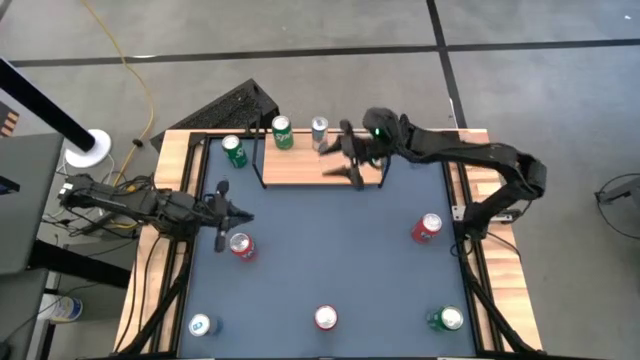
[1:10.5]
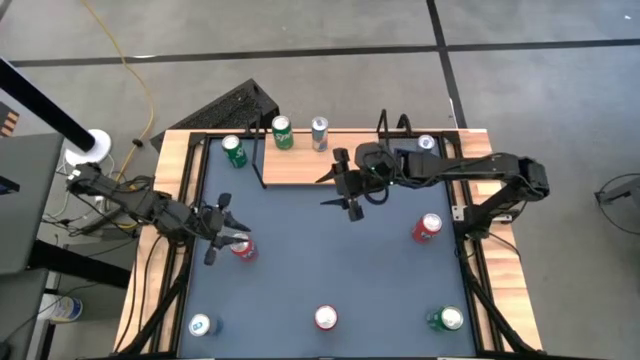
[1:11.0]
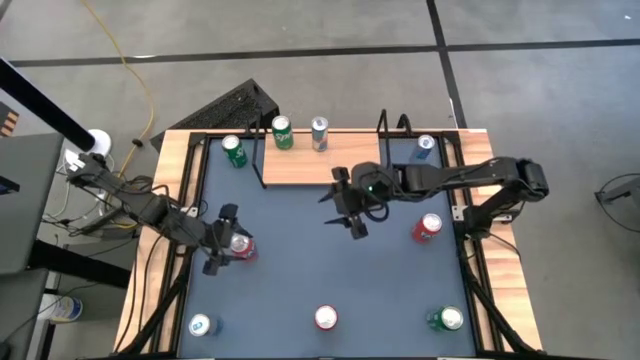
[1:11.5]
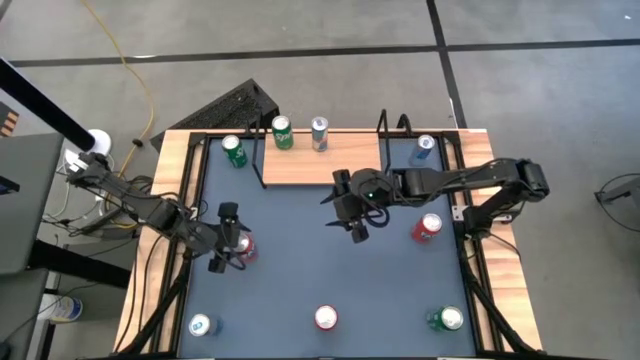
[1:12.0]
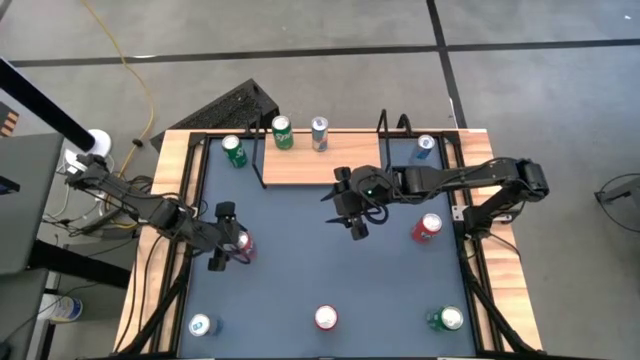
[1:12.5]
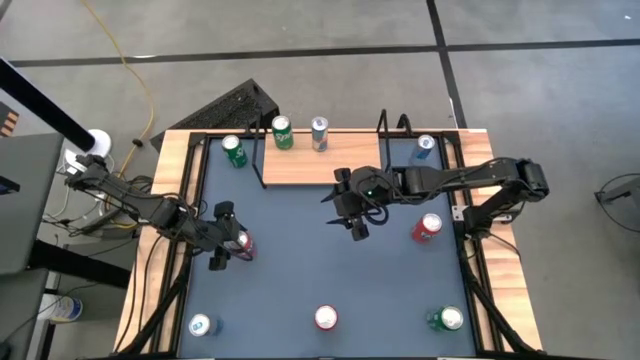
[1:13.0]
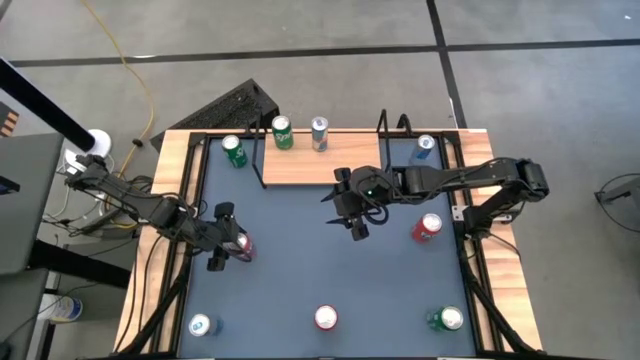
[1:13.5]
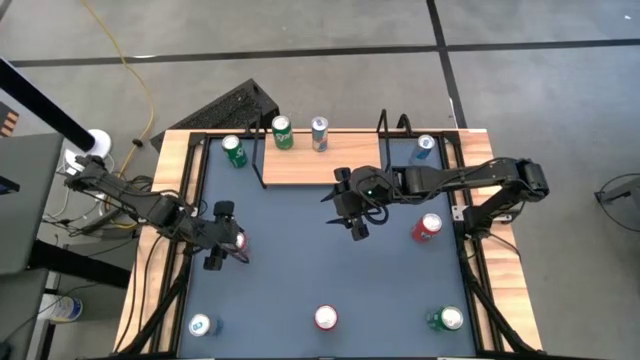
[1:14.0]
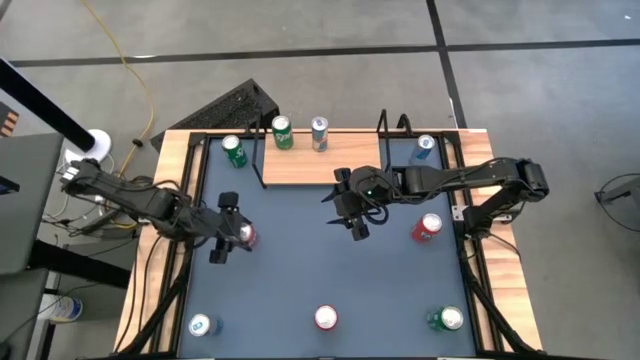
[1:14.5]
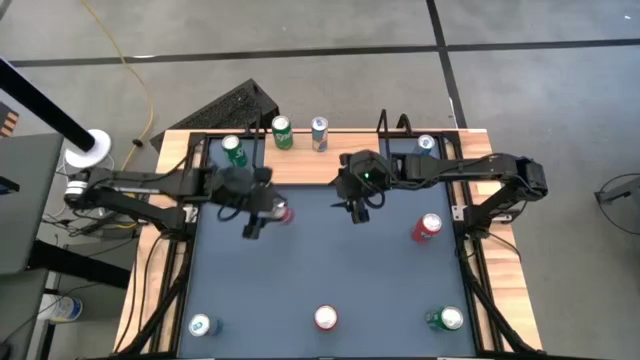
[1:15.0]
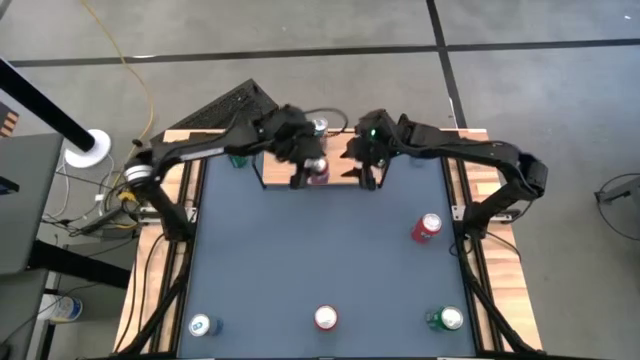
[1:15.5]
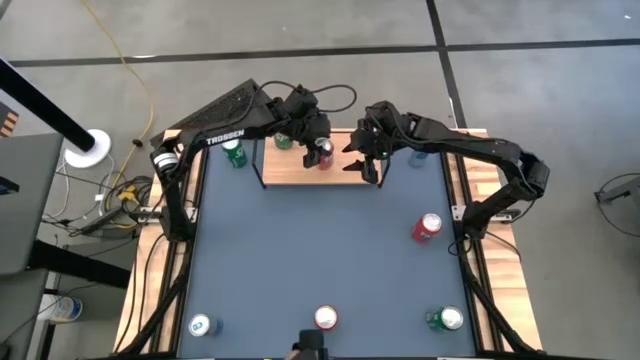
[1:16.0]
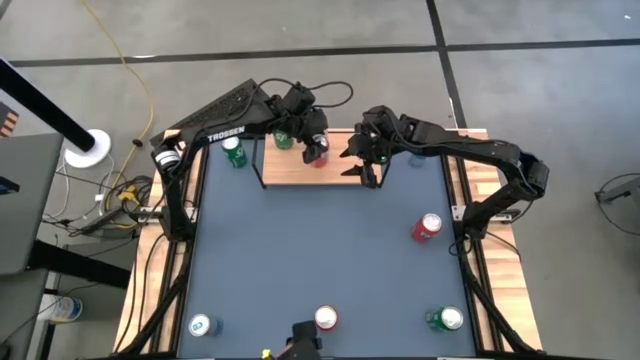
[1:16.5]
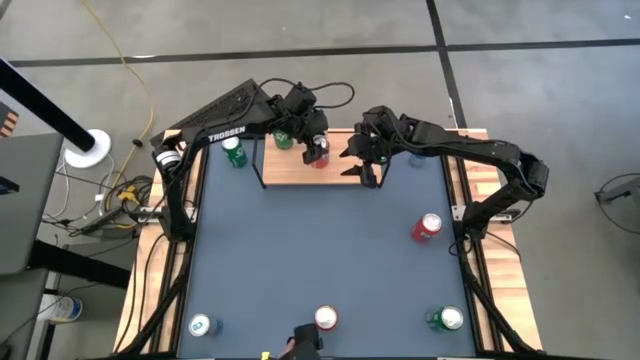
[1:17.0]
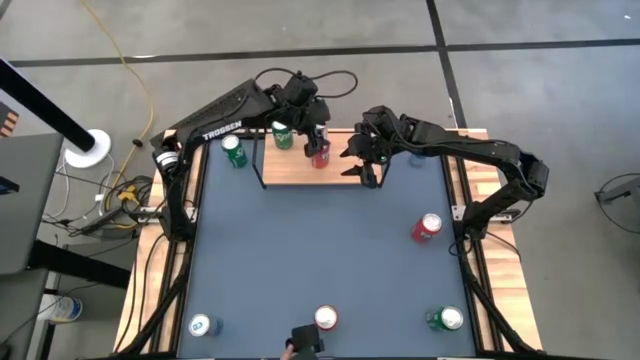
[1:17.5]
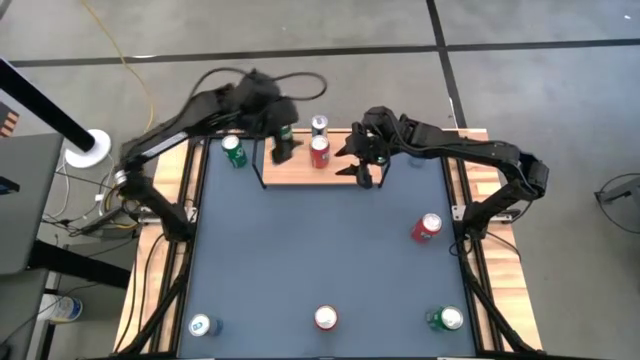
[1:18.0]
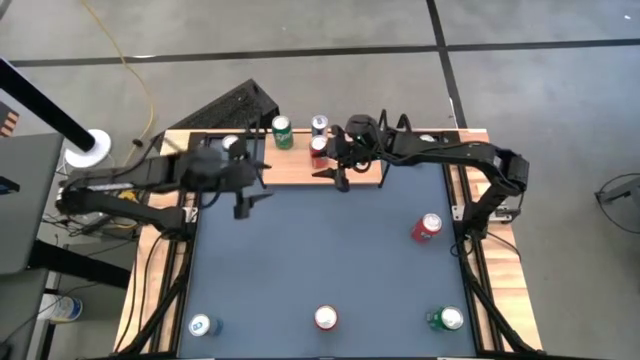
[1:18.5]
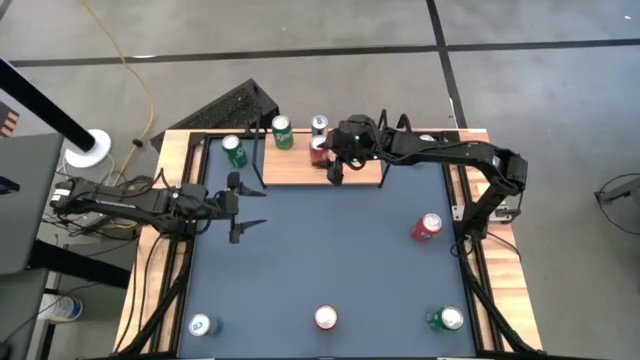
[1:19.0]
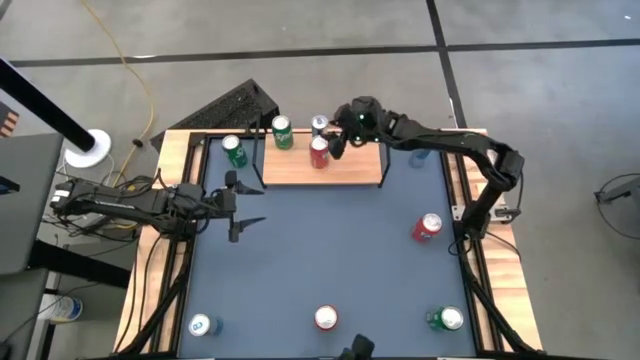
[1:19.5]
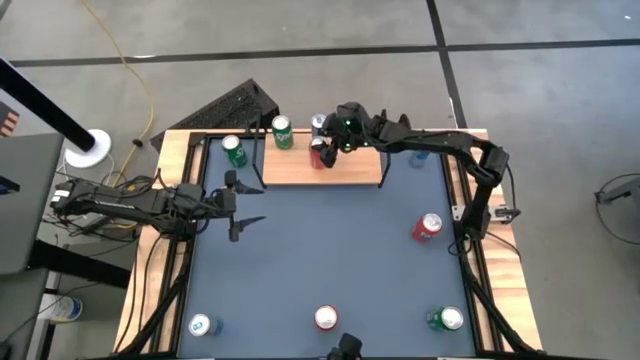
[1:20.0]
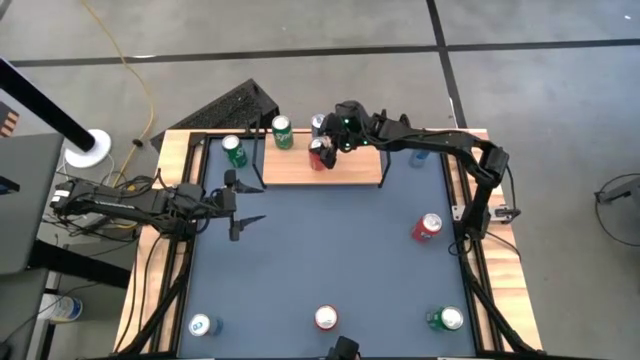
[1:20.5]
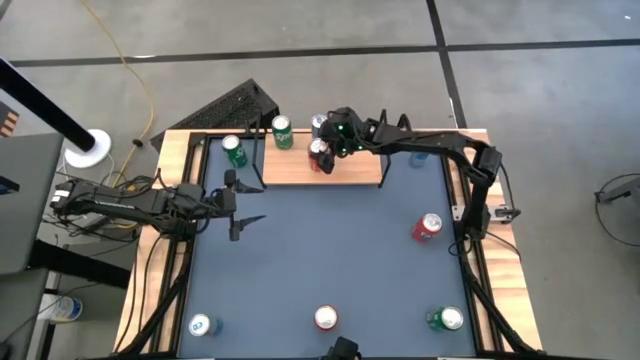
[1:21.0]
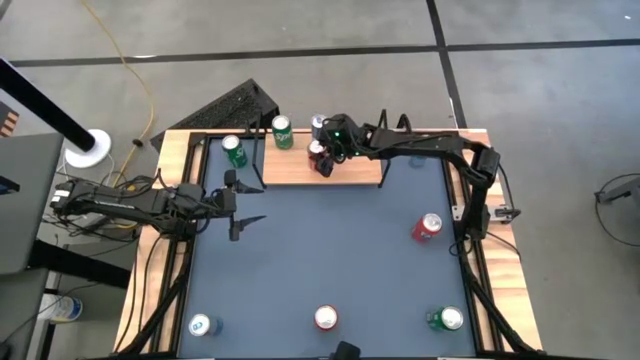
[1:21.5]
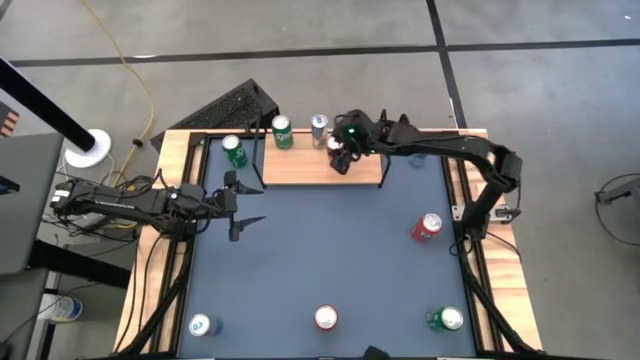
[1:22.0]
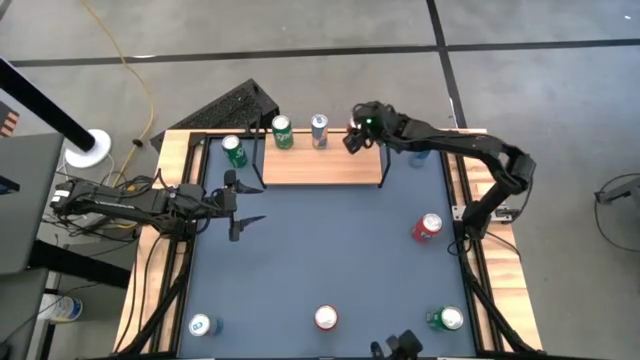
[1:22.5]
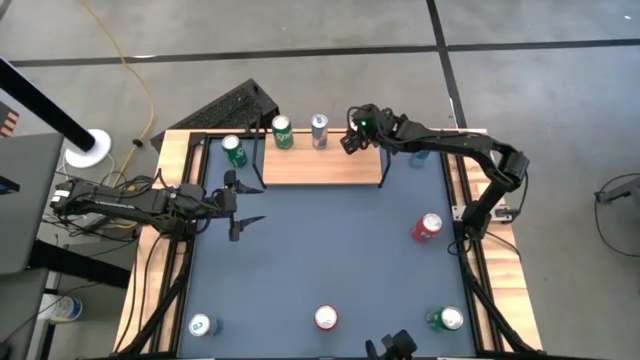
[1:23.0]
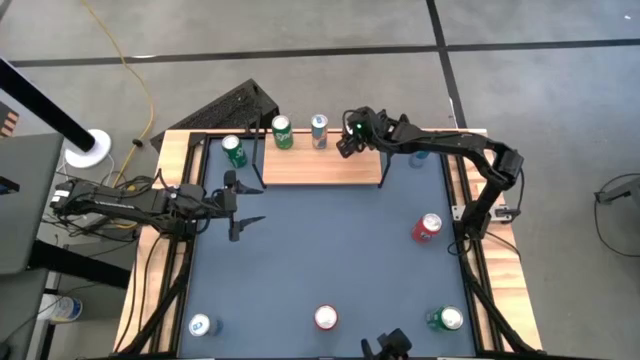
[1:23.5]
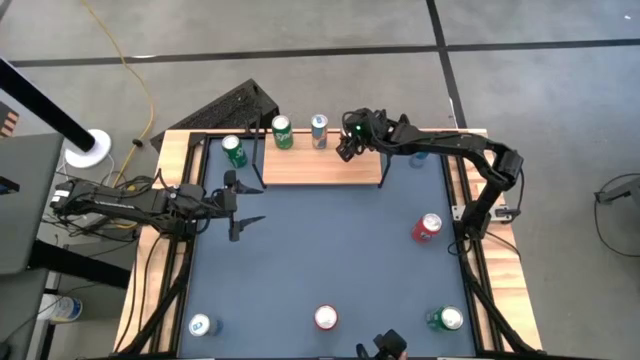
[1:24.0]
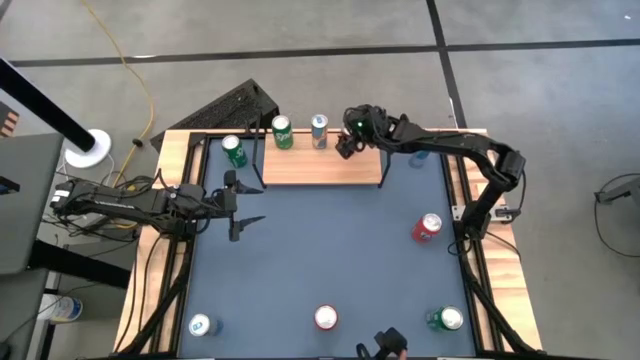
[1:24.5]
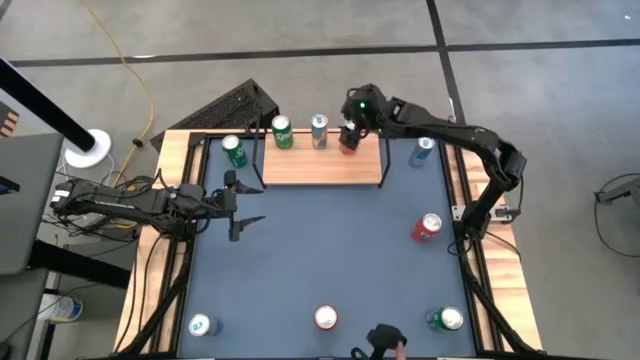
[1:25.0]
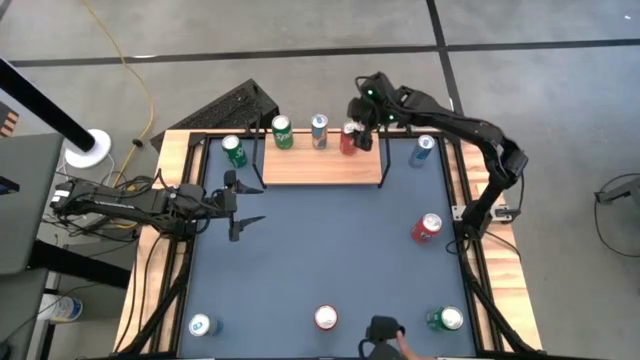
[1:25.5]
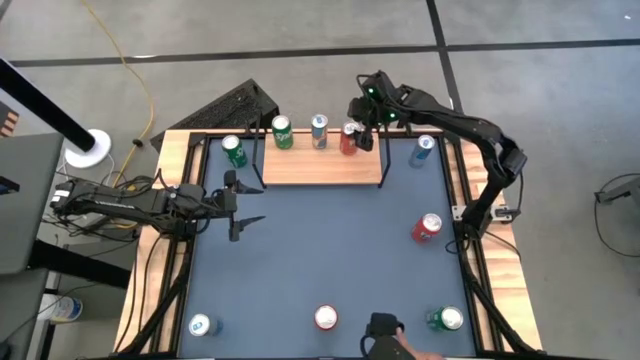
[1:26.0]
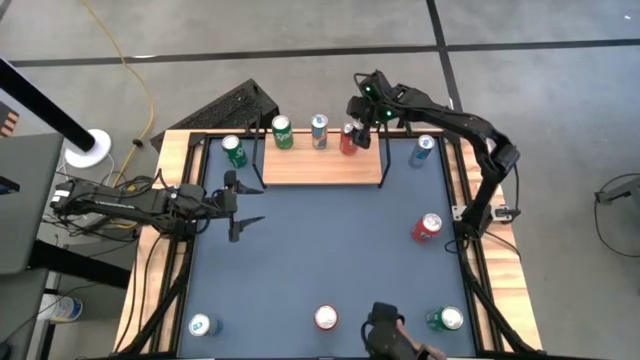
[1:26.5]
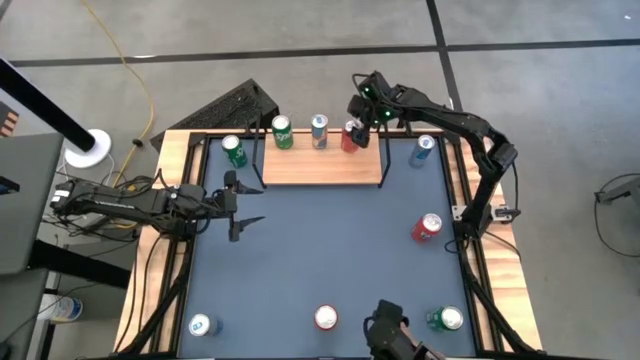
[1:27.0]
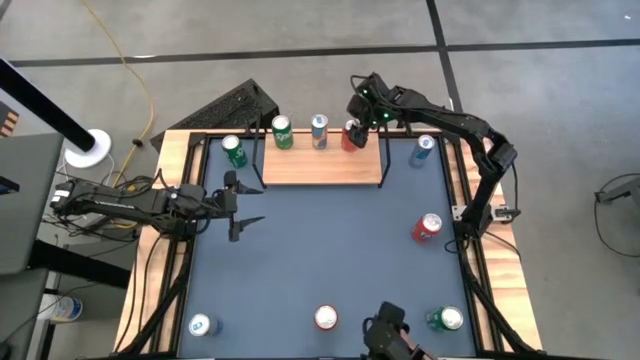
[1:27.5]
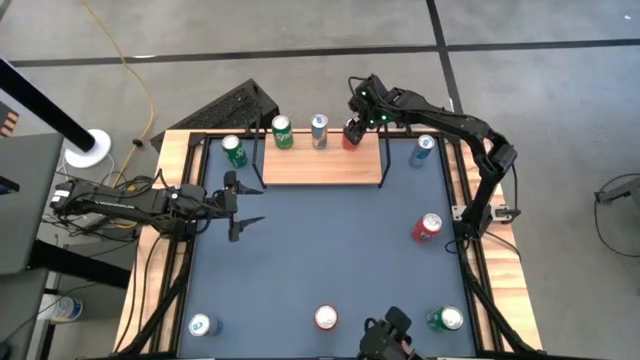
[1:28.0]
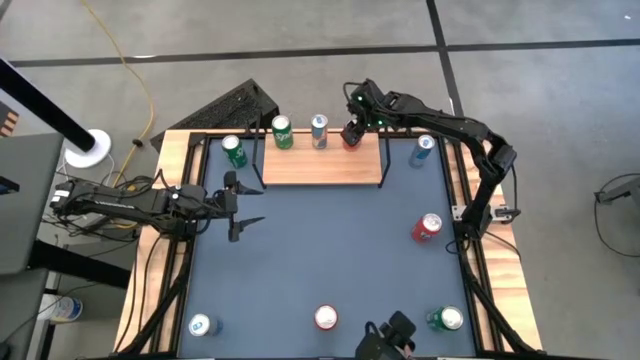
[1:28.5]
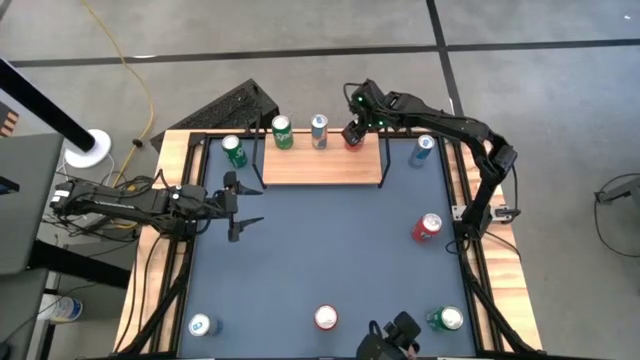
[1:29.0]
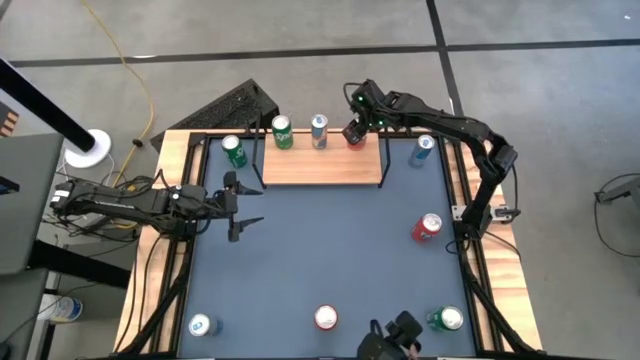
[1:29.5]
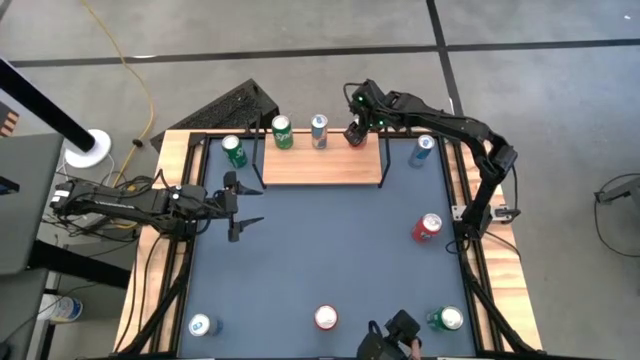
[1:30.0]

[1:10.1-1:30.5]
Task: Place canned beverage on shelf
Put the top left orange soda can on the shelf

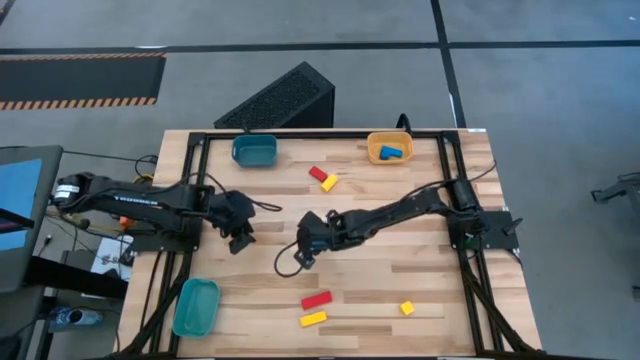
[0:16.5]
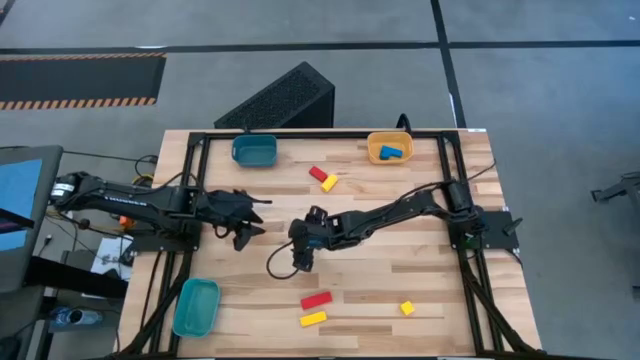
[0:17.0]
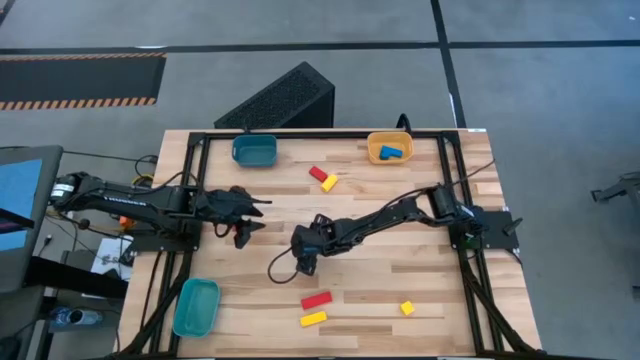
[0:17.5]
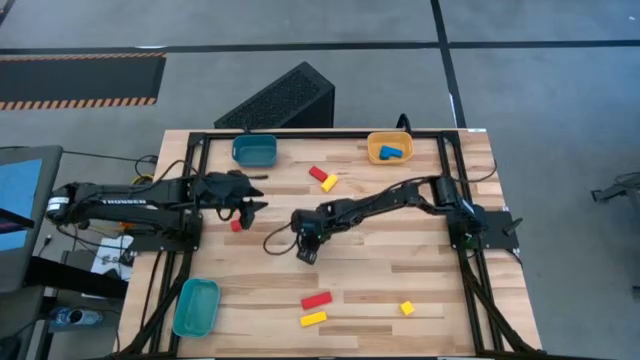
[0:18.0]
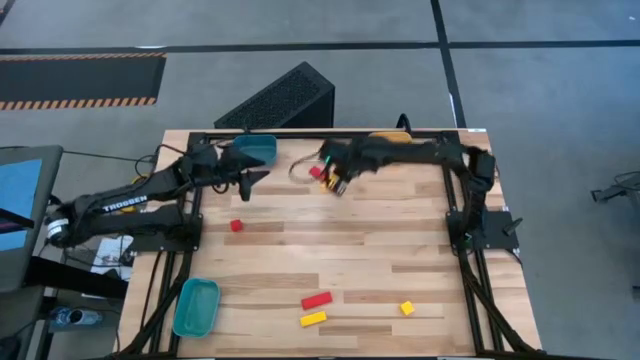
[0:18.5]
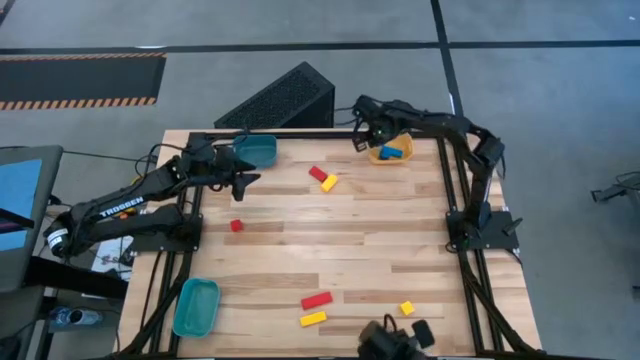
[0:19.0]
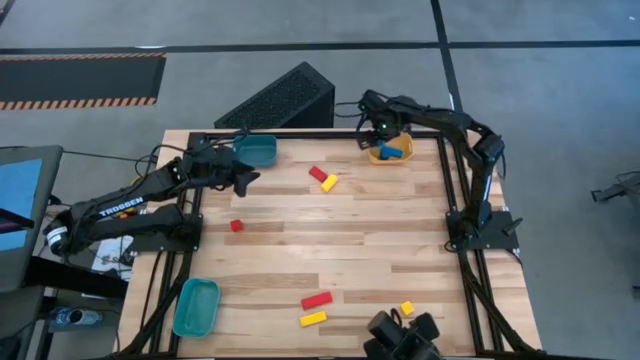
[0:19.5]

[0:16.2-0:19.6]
Task: Sort & place blocks by color
Put the blue block into the yellow bin
